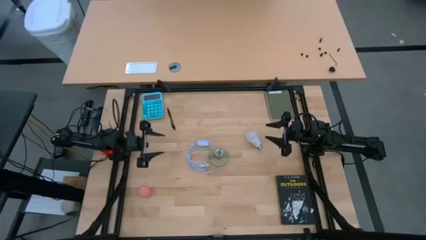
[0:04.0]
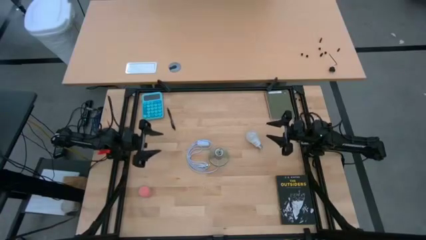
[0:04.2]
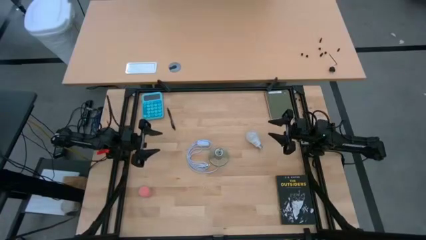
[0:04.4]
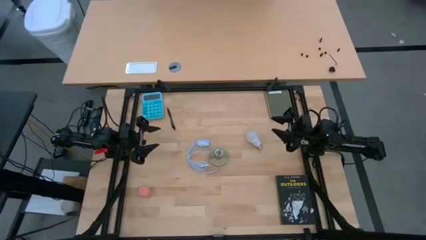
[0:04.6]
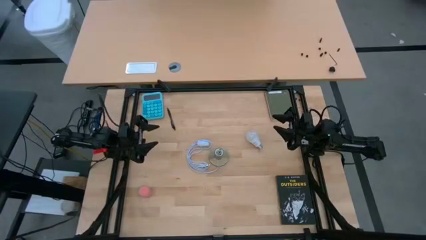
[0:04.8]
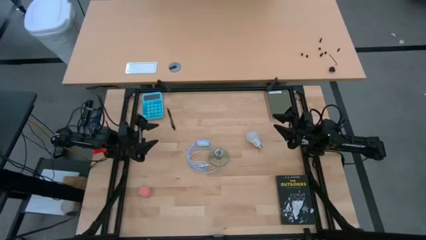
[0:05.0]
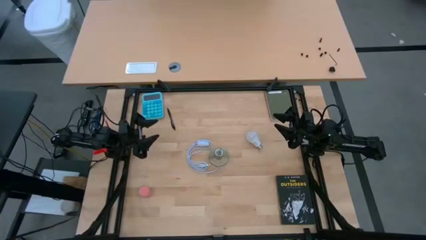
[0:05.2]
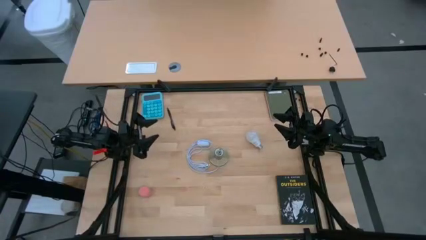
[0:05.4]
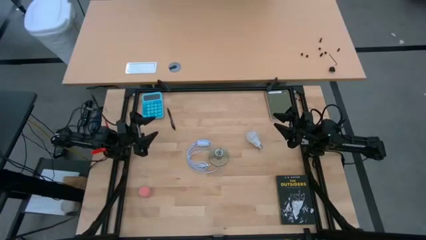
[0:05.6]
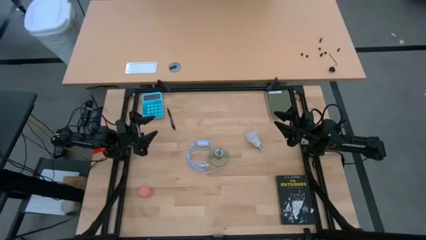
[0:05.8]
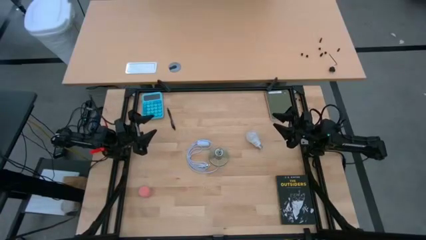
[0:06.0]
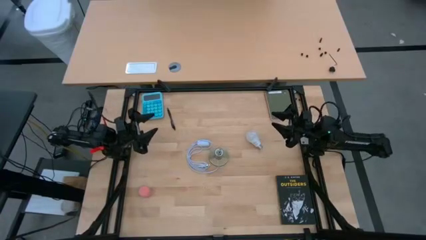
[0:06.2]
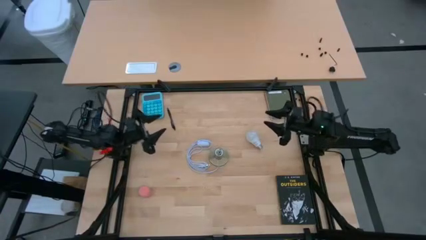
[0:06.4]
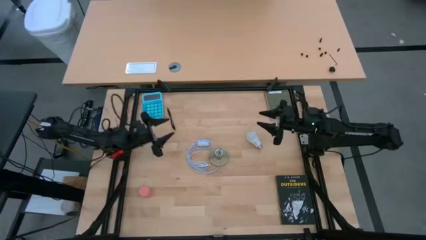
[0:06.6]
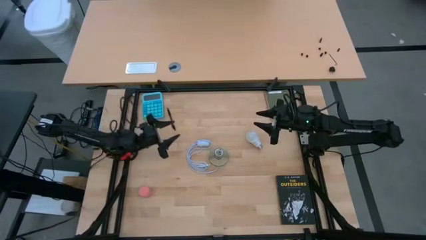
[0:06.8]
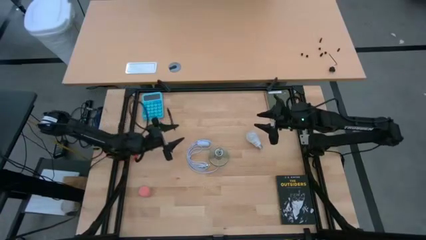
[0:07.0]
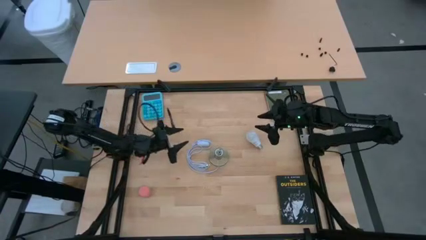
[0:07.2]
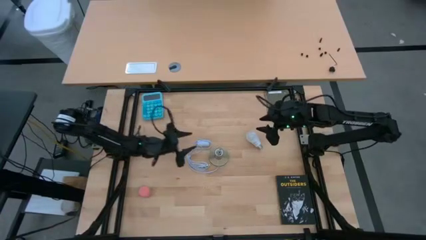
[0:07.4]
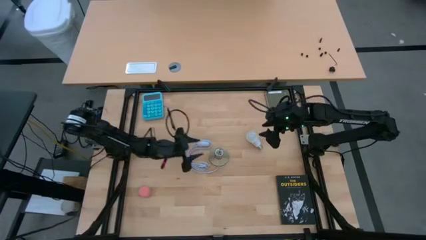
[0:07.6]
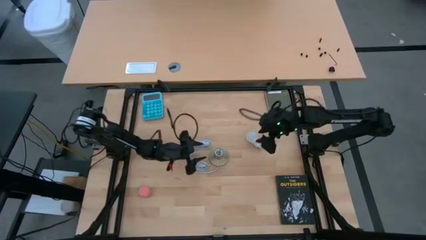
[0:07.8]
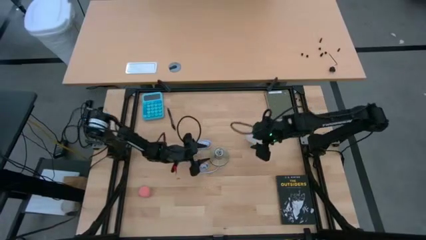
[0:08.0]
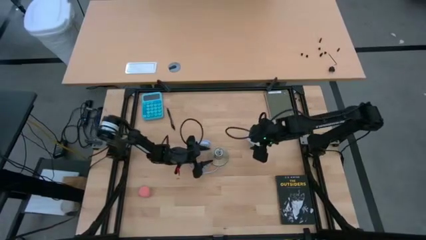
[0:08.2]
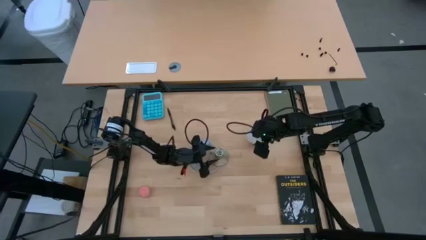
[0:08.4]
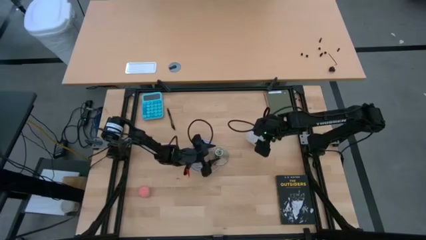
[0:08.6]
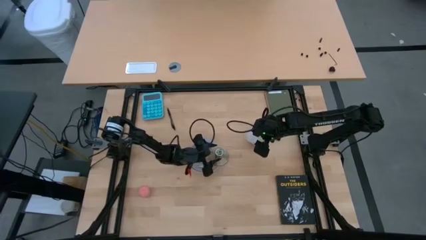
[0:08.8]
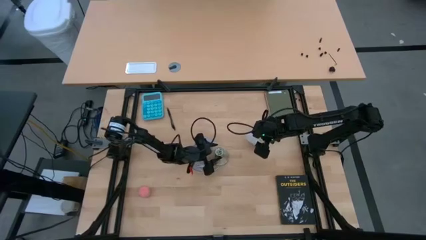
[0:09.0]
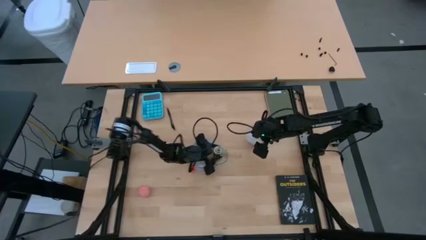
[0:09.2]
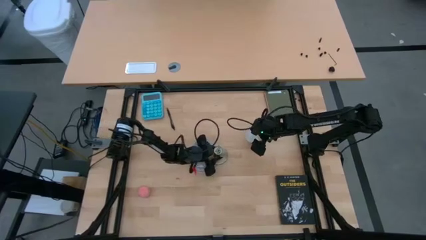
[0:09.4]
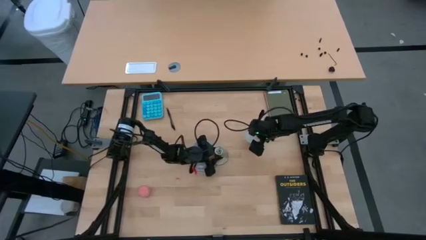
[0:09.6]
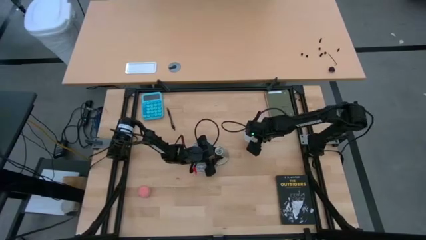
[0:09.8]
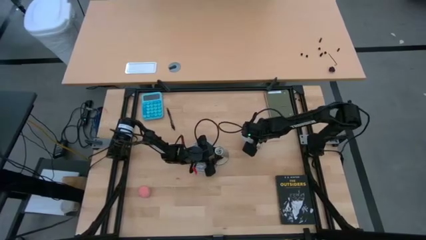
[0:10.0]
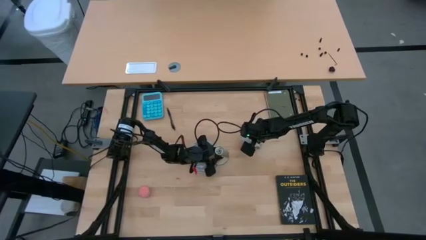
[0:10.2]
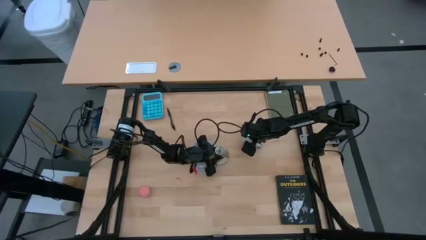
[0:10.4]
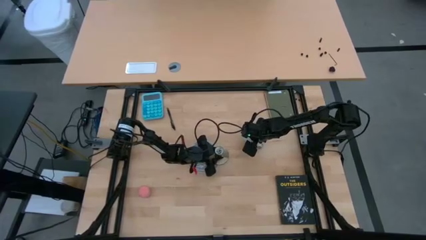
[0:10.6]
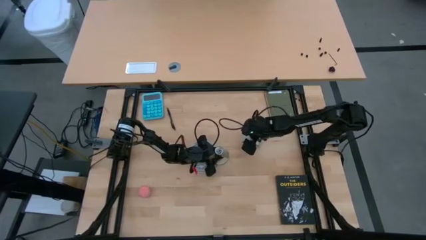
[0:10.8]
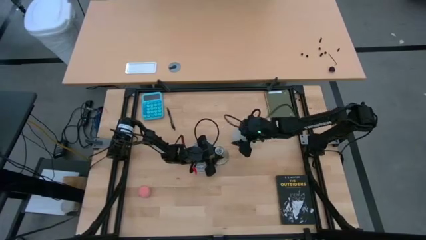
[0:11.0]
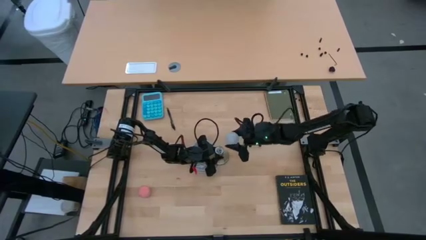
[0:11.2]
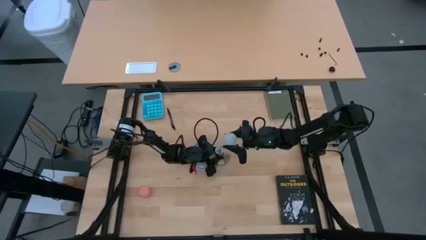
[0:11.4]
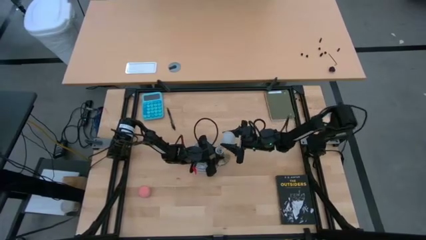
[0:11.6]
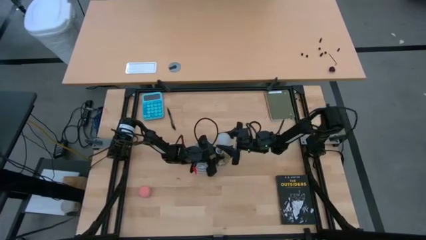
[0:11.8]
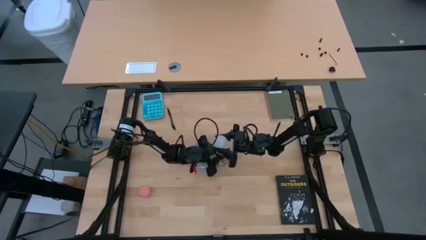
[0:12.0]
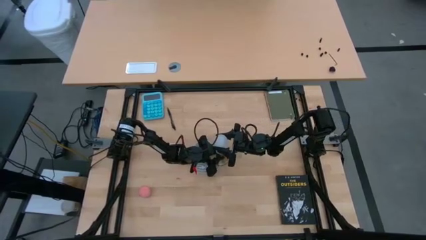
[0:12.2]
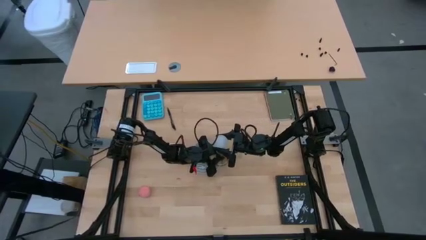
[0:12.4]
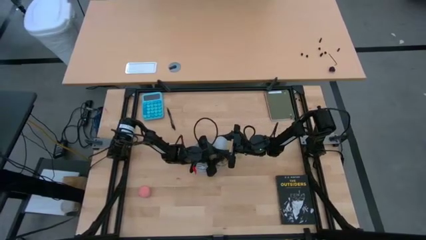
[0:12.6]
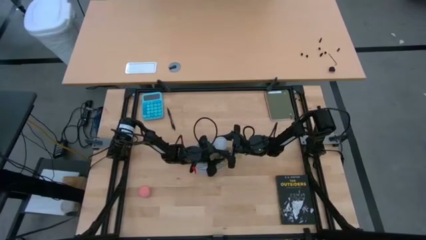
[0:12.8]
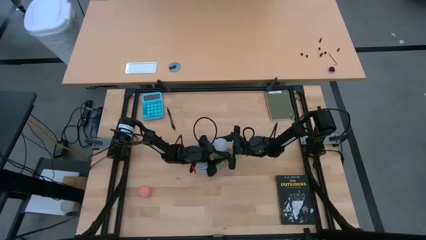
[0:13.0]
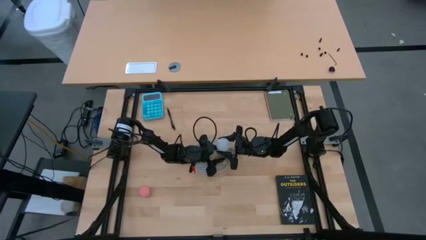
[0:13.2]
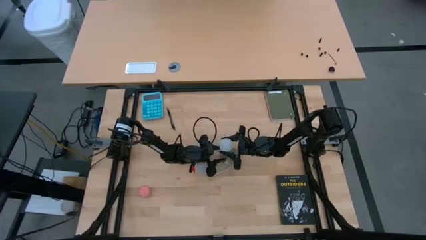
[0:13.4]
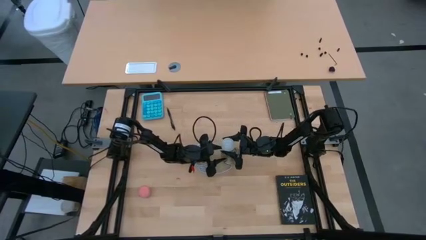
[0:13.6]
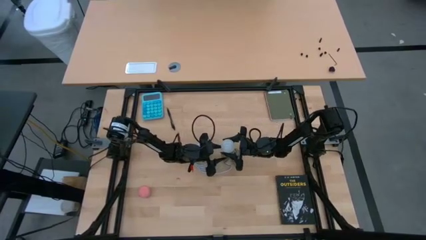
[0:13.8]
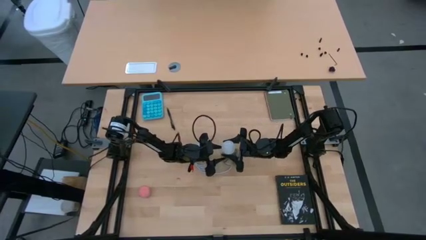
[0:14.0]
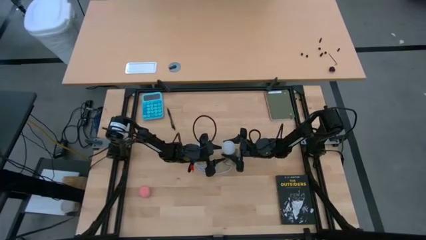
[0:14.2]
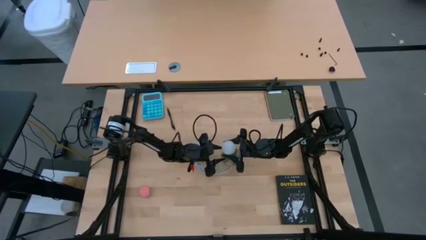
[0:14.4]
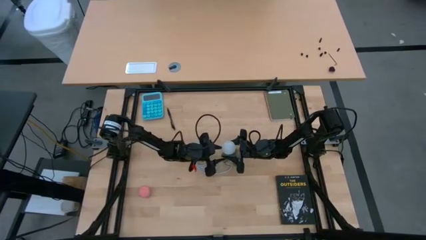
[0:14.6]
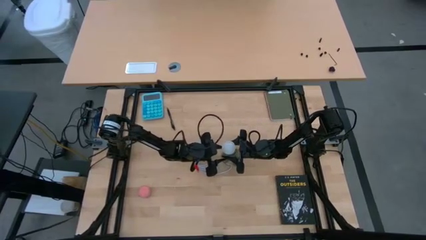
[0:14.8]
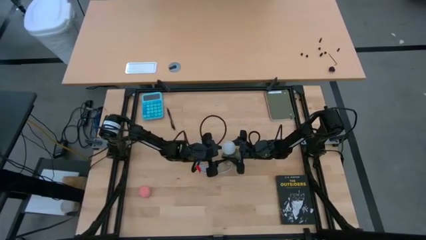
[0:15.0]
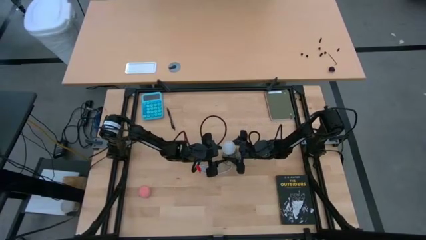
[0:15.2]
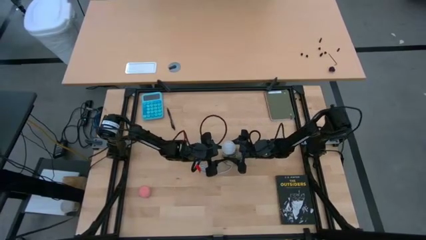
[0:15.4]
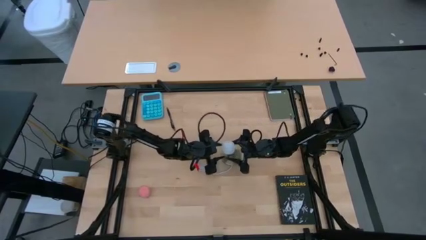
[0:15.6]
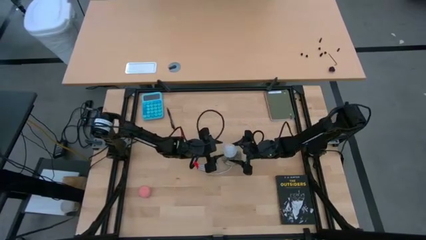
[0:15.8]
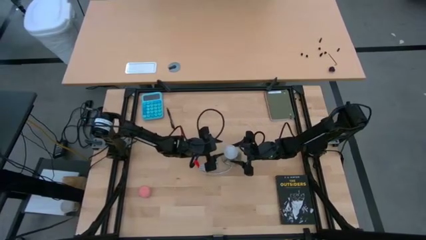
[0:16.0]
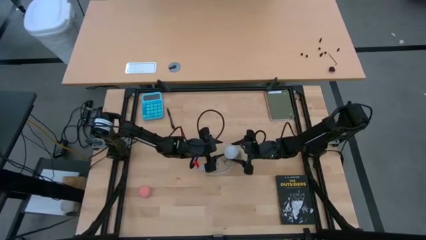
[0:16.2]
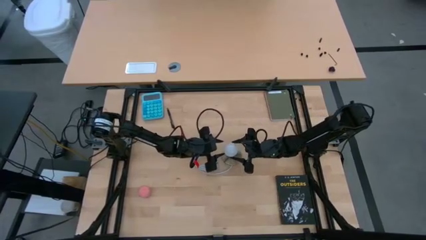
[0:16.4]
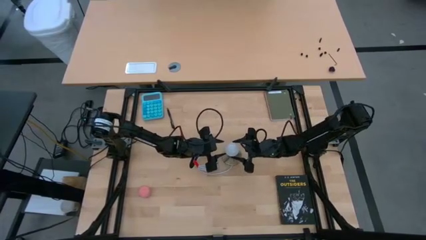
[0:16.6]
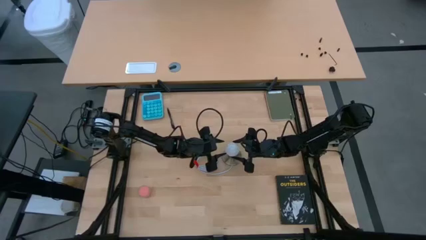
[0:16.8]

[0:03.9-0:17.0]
Task: Screw lightbulb
Insert the white lightbulb into the desk lamp
